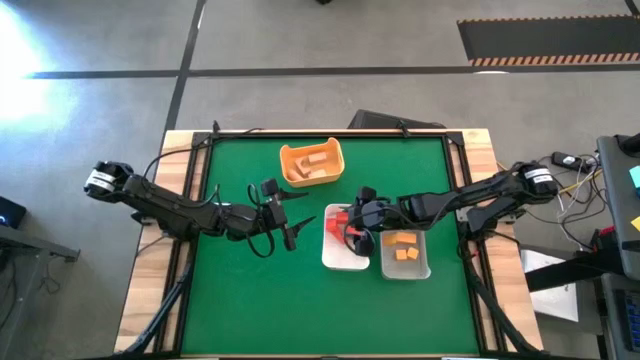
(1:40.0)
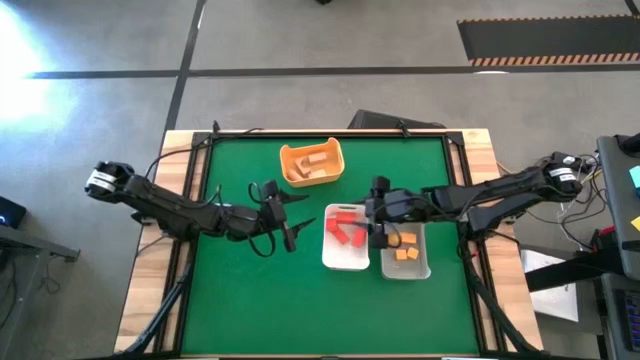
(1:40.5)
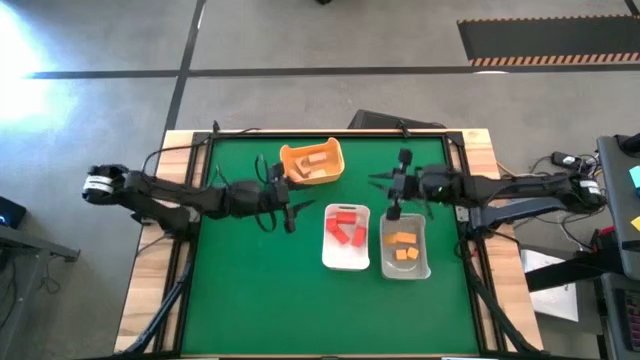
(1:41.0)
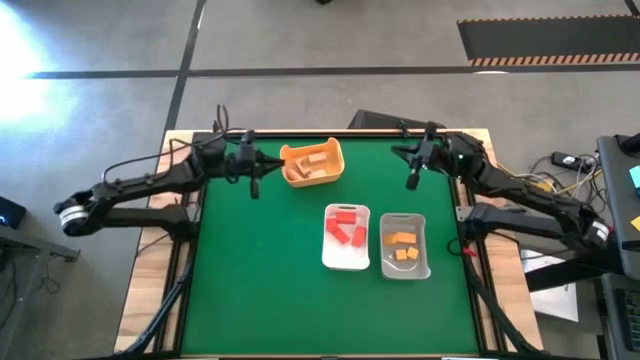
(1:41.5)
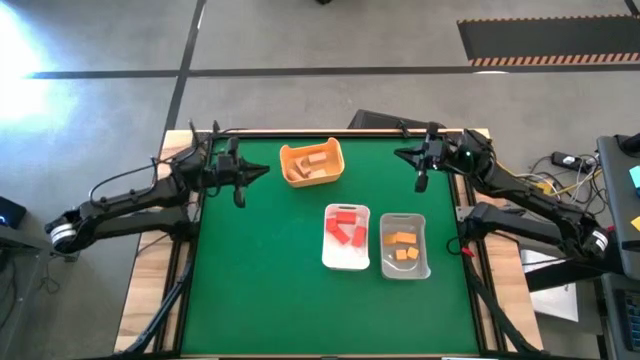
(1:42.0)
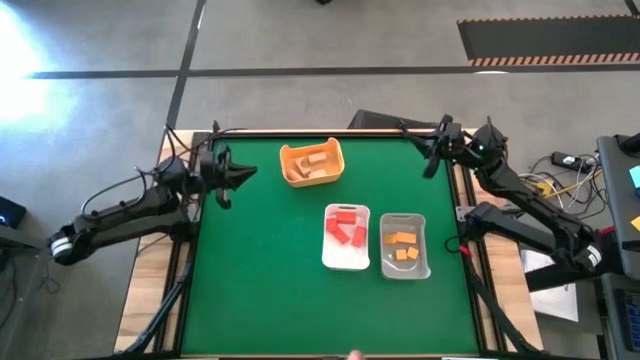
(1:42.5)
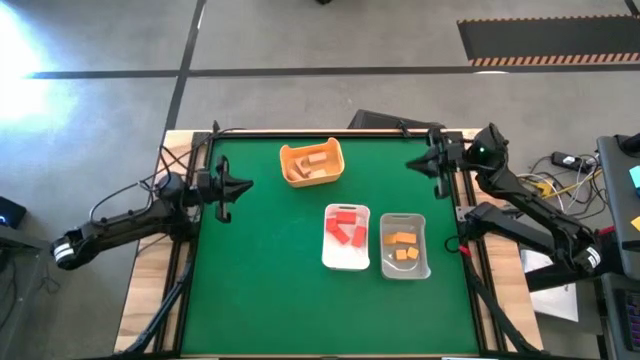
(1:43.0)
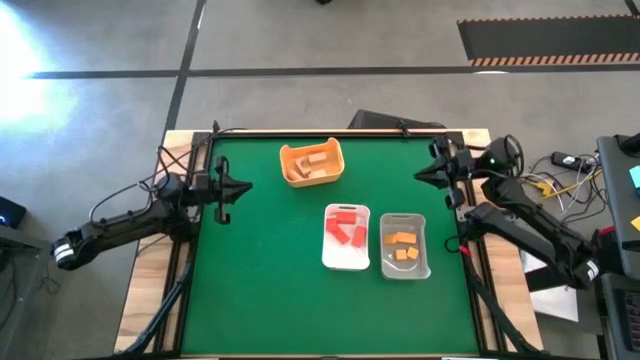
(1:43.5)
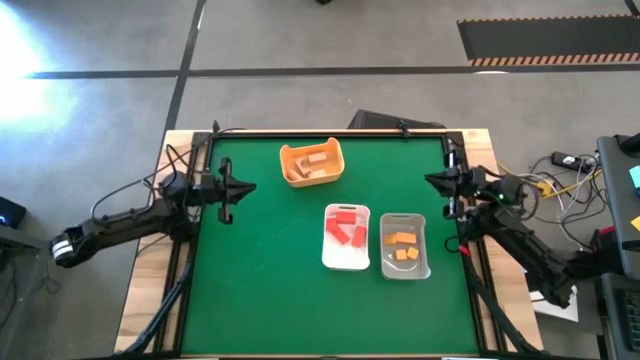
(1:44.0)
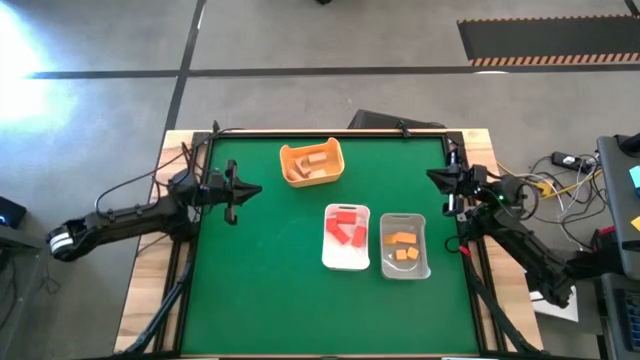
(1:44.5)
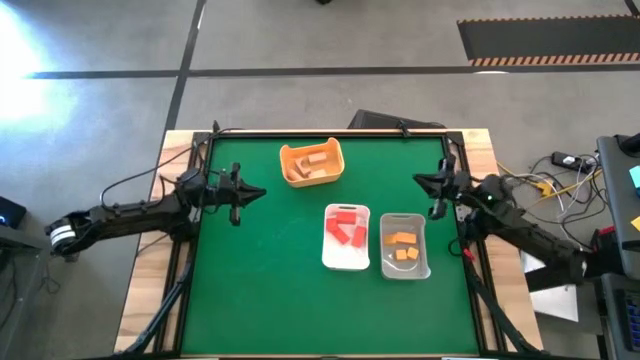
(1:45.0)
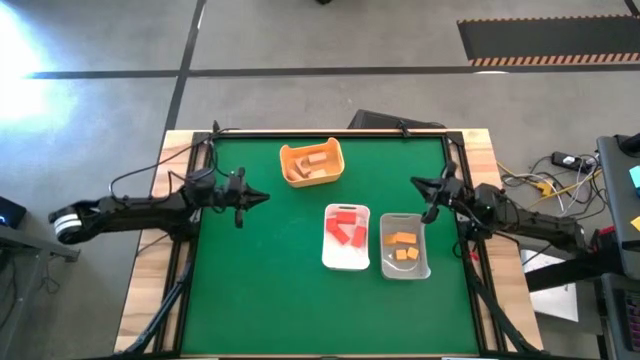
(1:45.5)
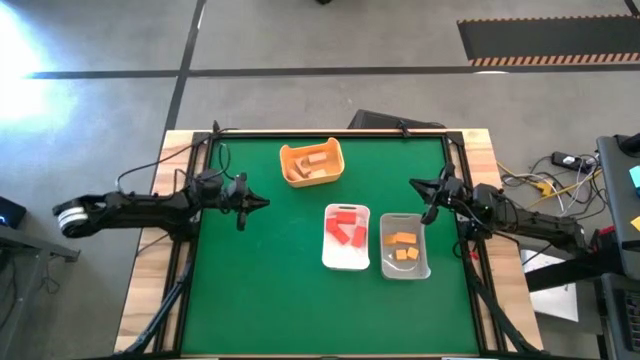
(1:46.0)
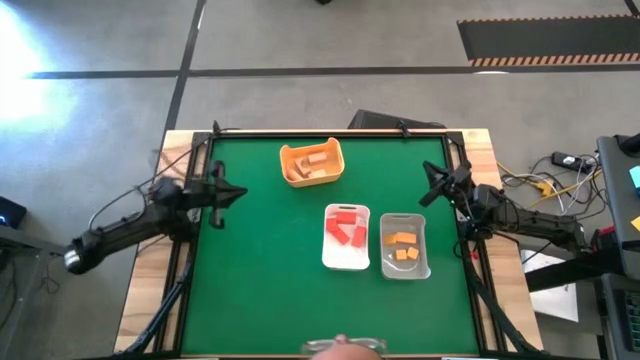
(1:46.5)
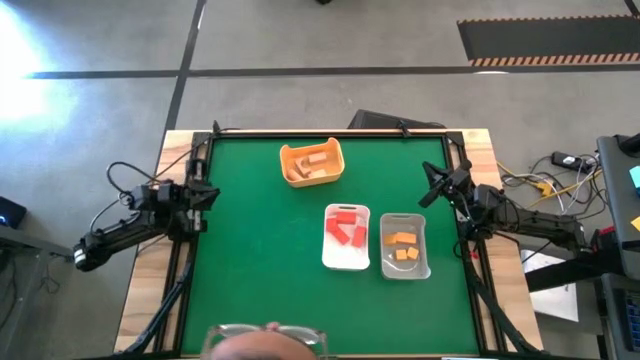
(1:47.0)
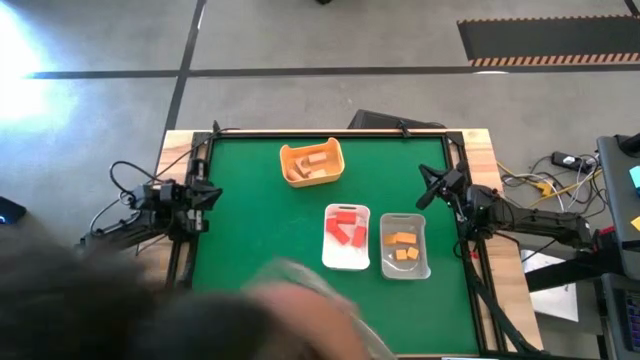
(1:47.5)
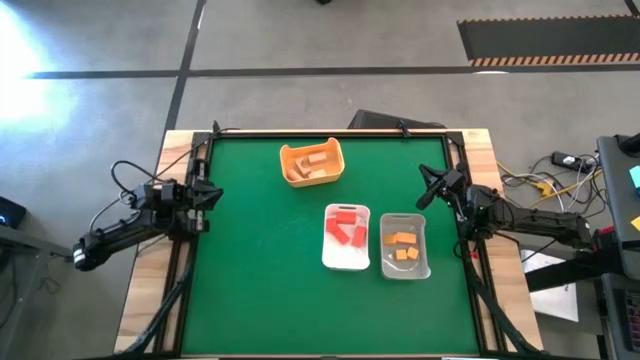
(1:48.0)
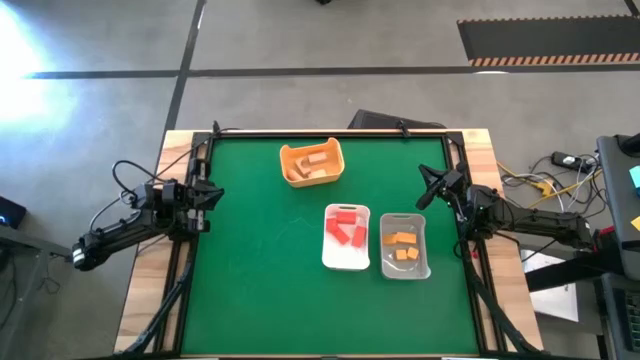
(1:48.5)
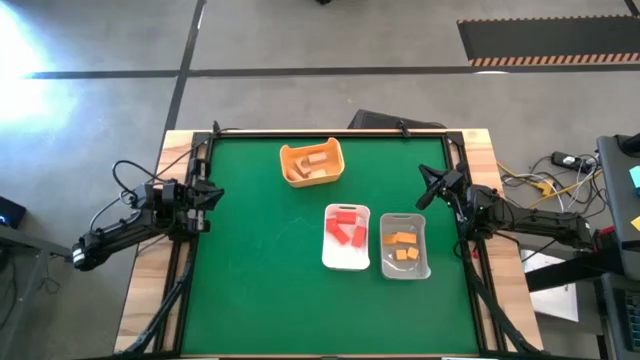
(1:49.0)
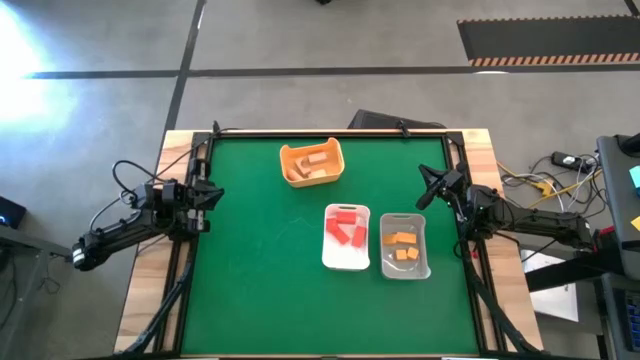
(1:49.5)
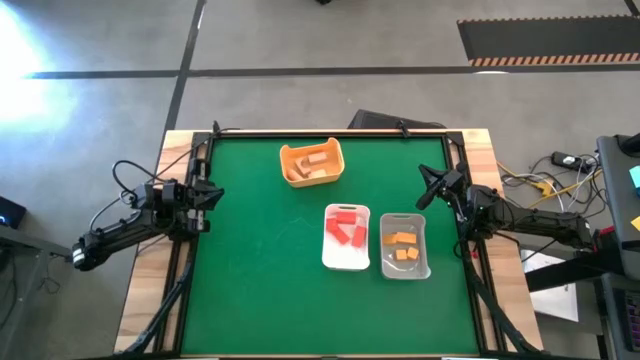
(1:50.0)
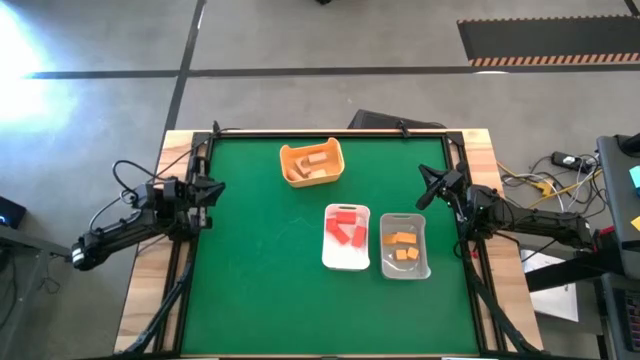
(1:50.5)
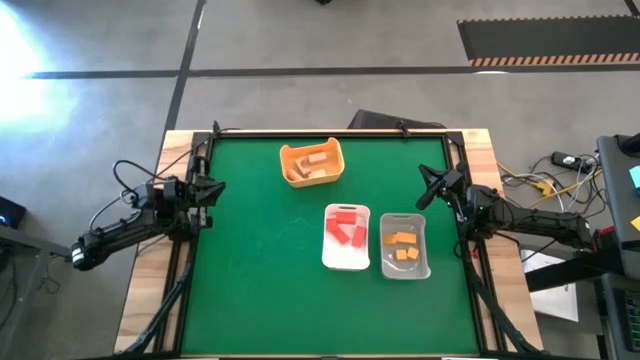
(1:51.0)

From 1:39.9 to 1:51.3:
Task: Sort & place blocks by color
Return to Home Position

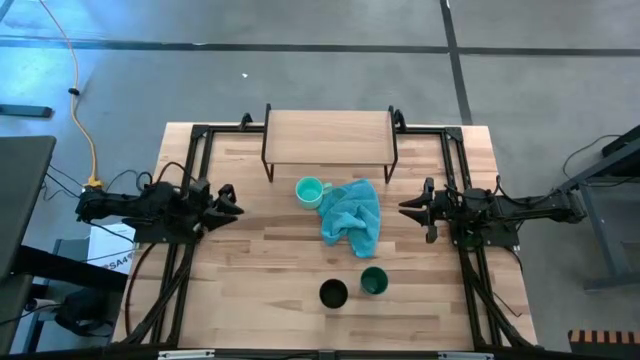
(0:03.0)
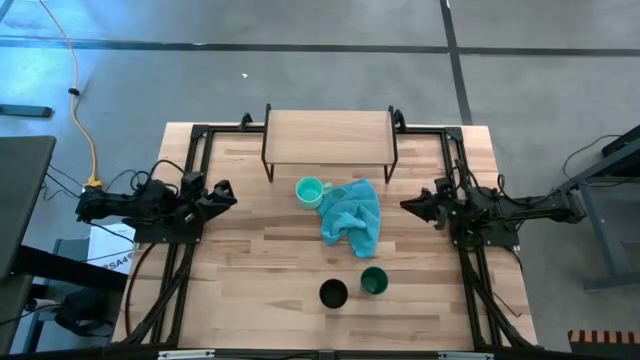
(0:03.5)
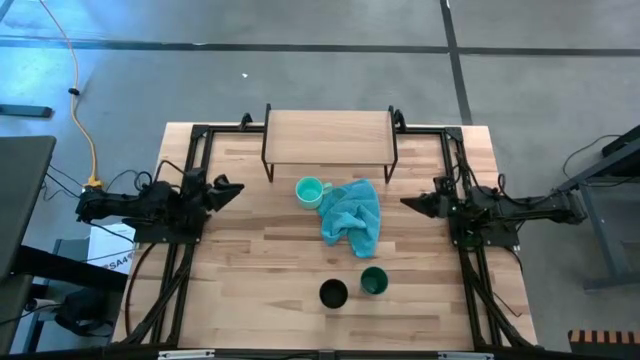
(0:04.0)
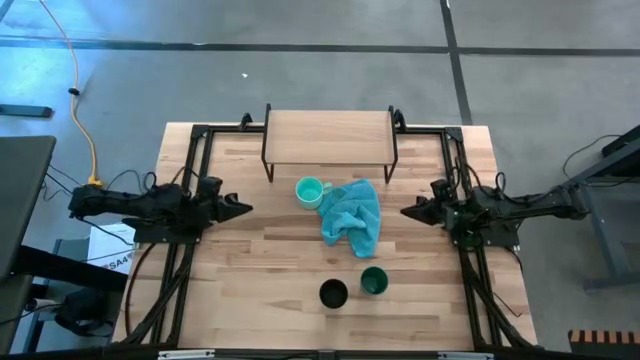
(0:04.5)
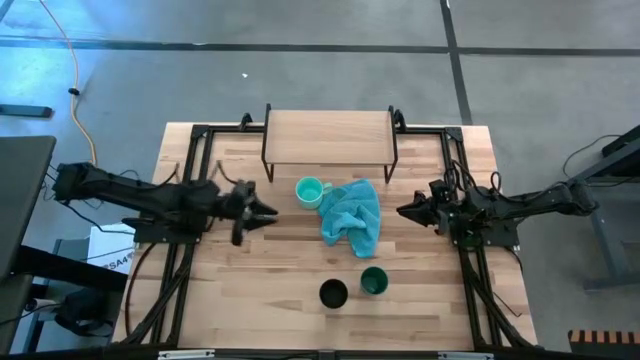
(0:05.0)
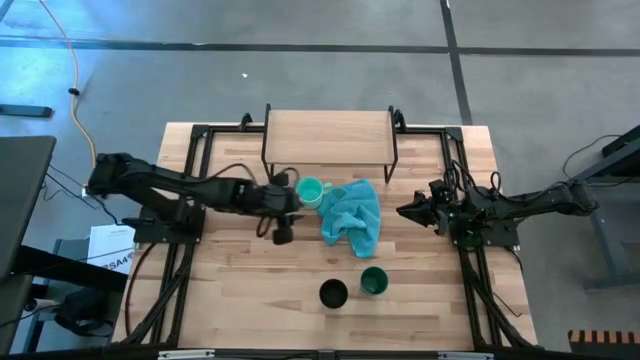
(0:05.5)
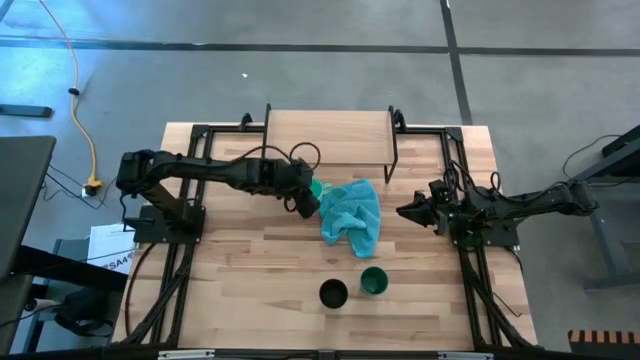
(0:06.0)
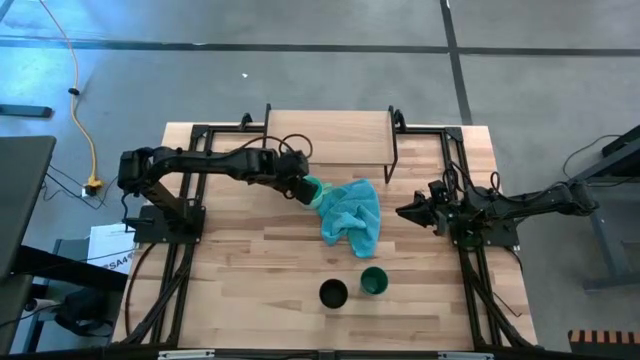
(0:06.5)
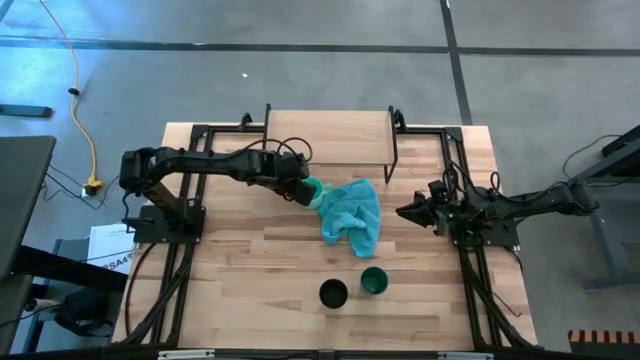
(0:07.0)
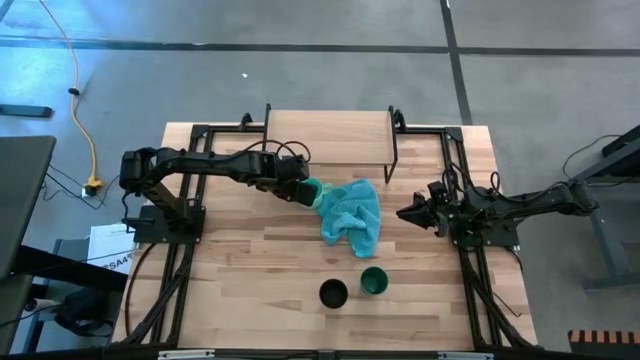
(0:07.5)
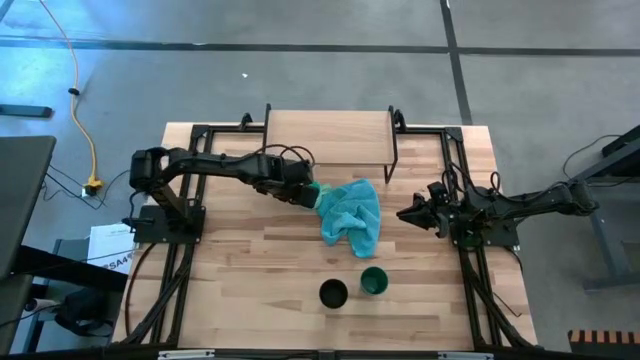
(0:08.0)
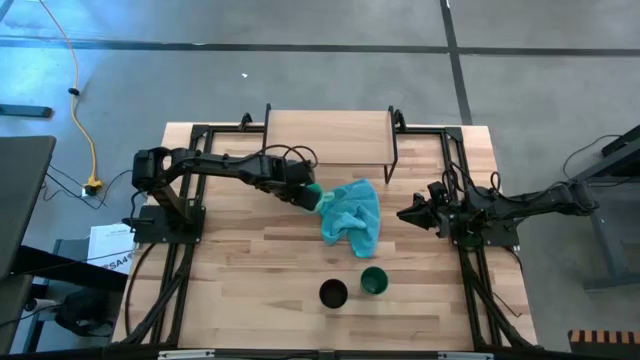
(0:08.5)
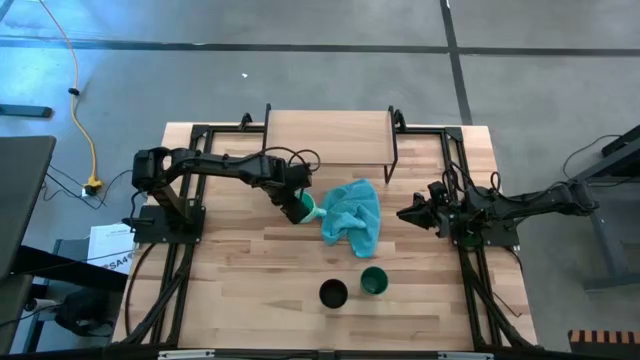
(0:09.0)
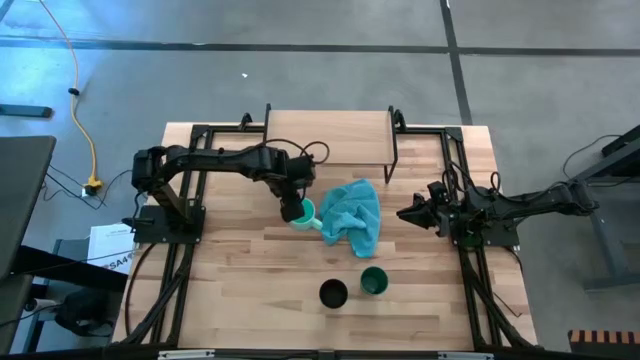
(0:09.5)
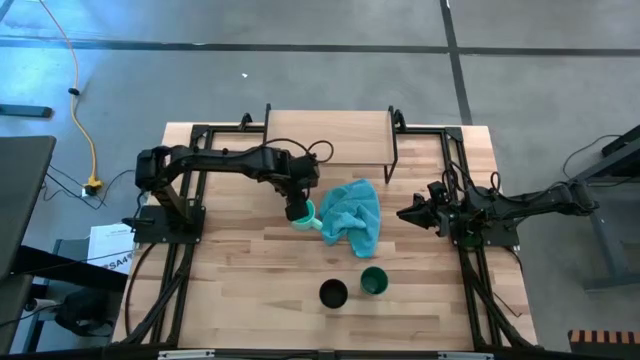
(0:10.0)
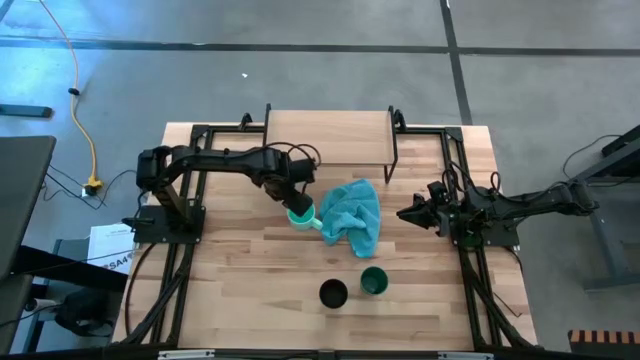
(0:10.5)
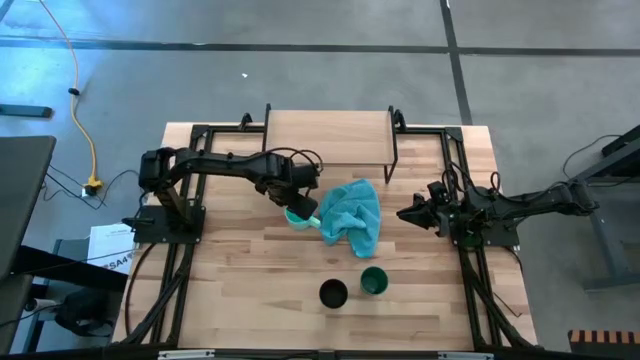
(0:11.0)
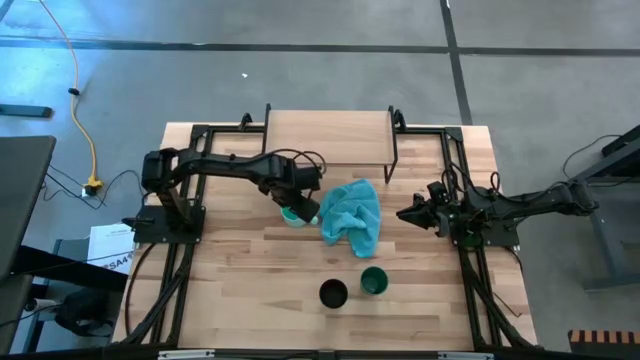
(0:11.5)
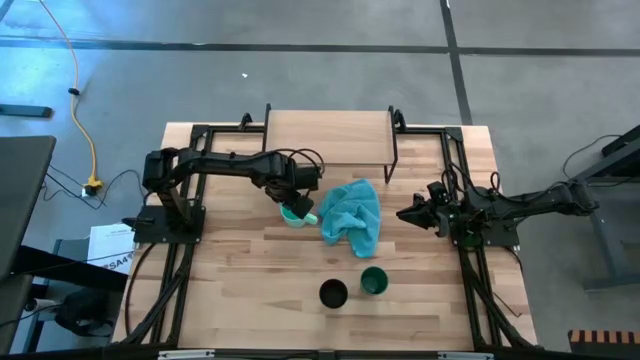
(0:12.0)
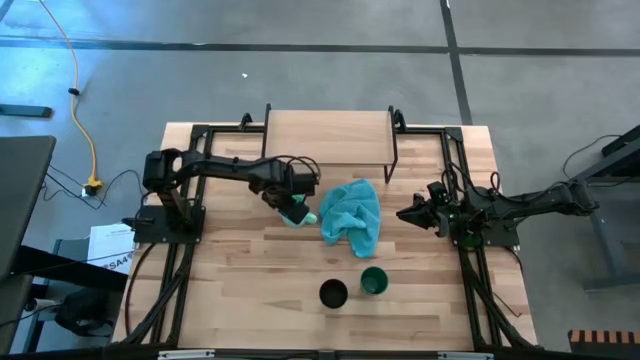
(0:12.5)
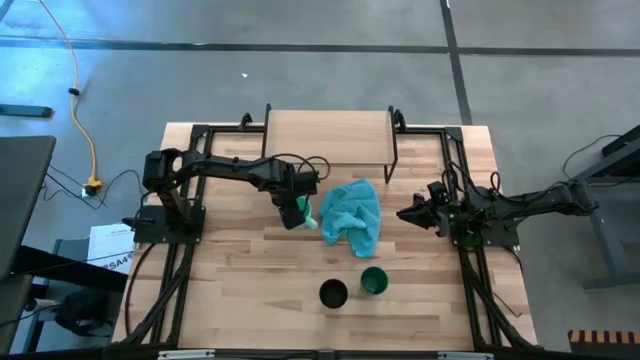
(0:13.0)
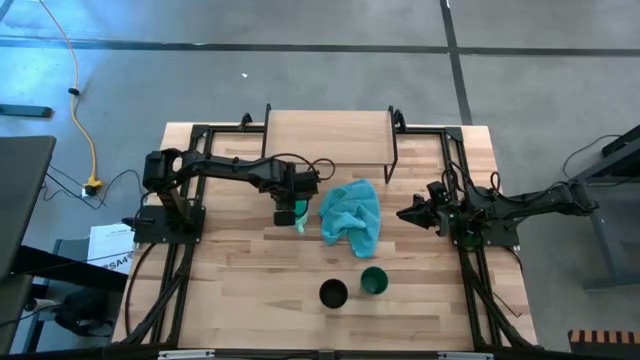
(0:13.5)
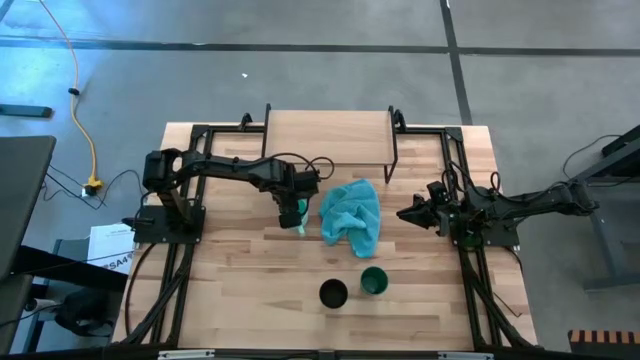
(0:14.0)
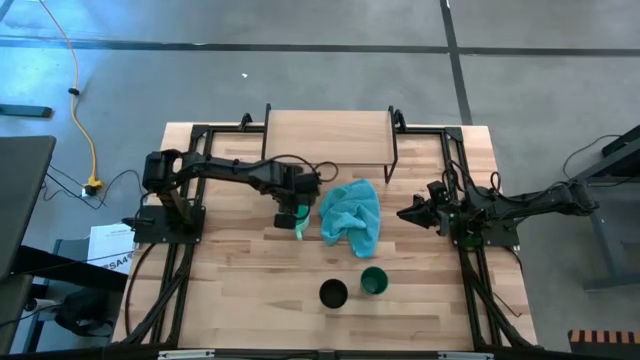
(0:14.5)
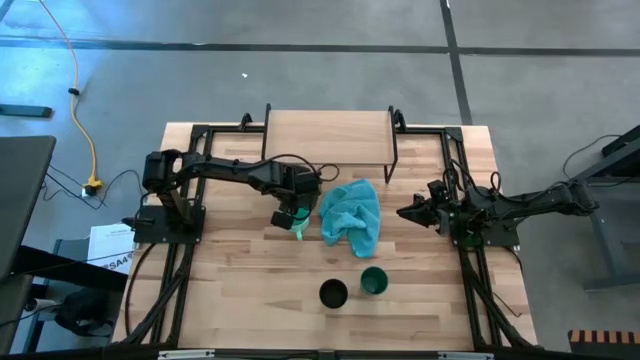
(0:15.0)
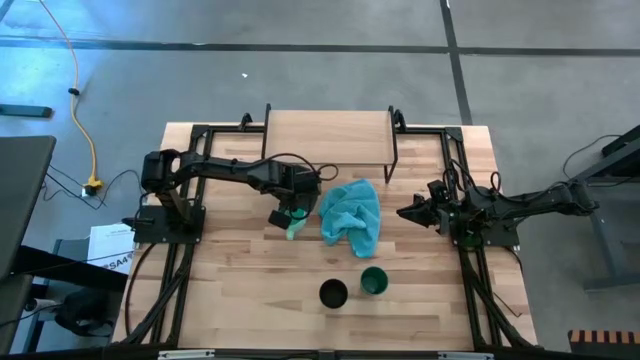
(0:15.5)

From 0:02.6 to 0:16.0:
Task: Stack small to large cups/mugs on shelf
Put the light blue mug on the shelf
